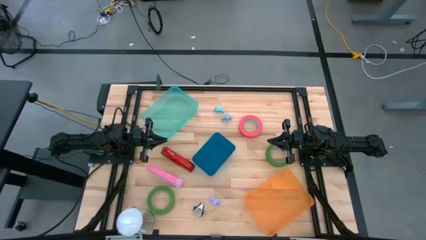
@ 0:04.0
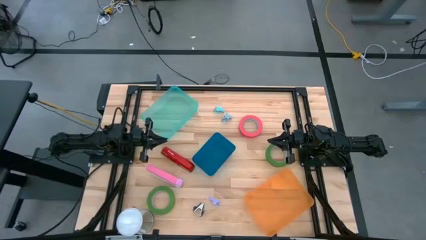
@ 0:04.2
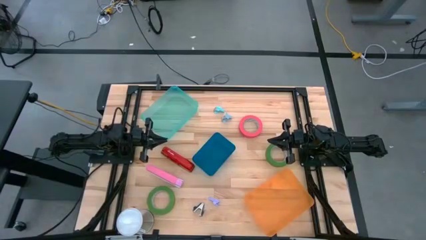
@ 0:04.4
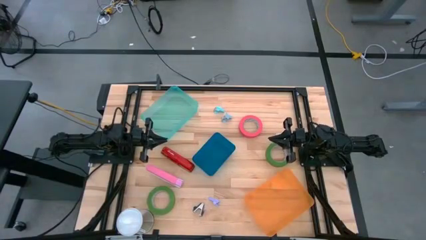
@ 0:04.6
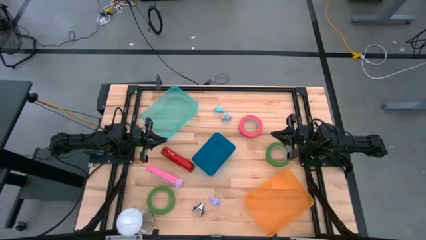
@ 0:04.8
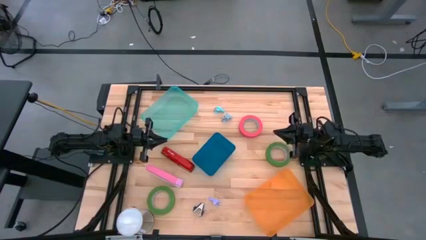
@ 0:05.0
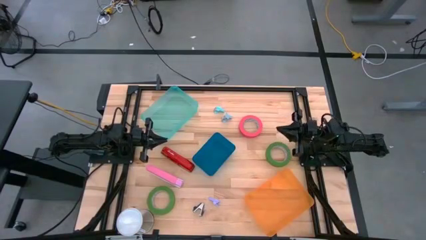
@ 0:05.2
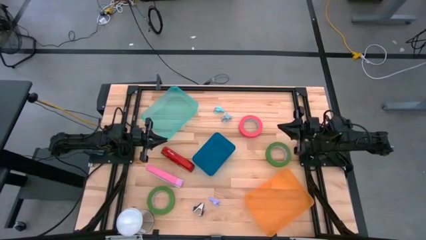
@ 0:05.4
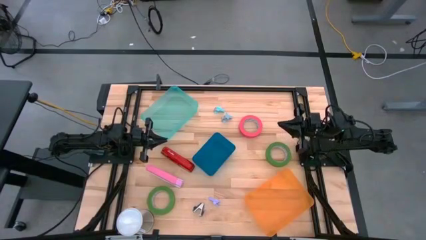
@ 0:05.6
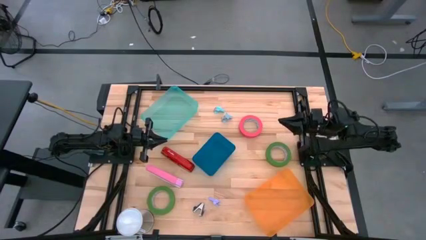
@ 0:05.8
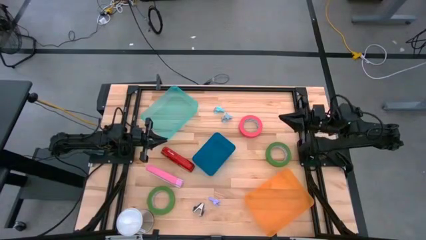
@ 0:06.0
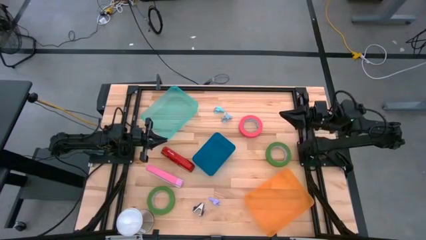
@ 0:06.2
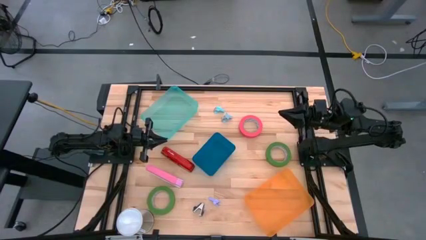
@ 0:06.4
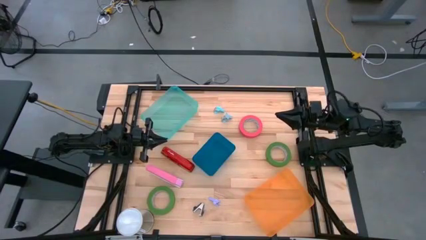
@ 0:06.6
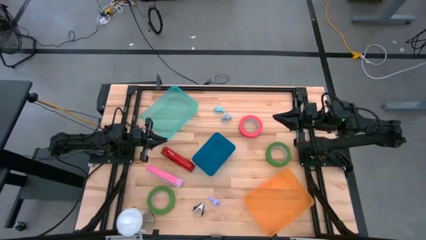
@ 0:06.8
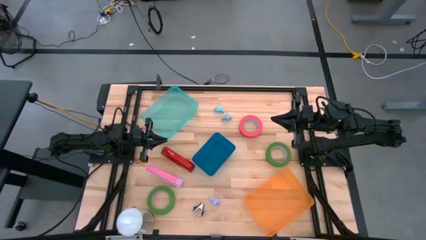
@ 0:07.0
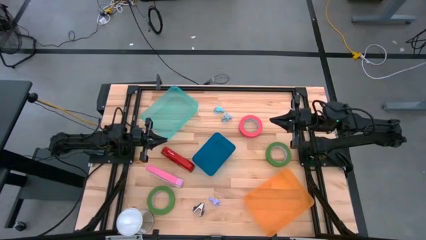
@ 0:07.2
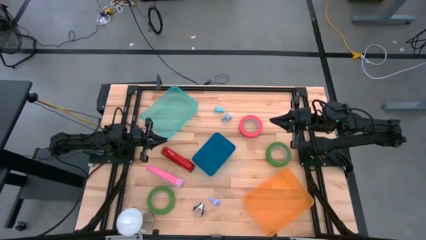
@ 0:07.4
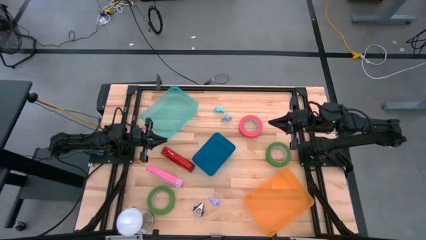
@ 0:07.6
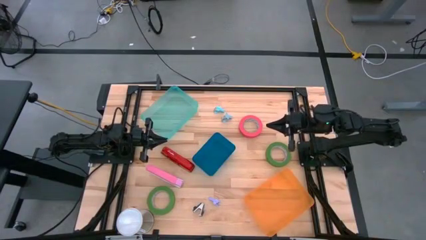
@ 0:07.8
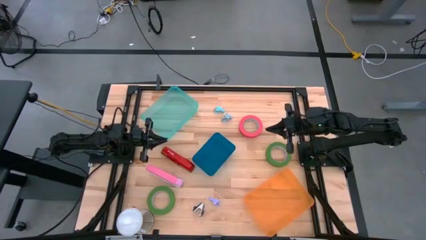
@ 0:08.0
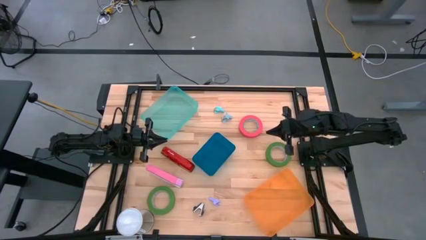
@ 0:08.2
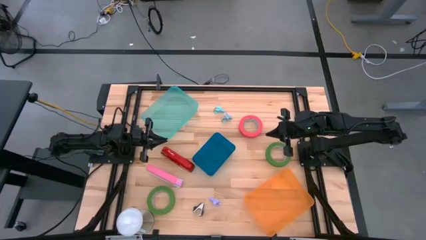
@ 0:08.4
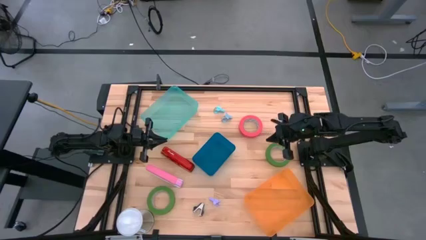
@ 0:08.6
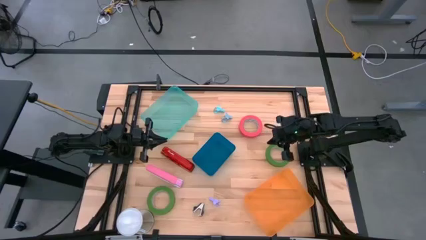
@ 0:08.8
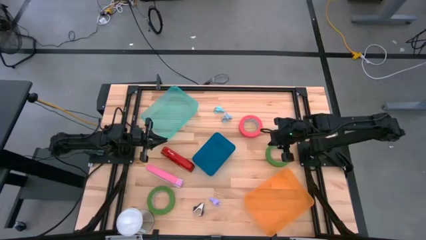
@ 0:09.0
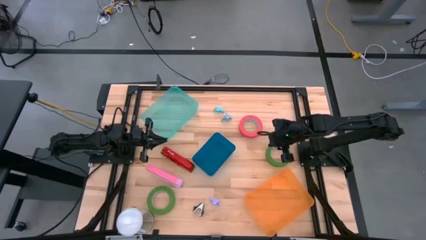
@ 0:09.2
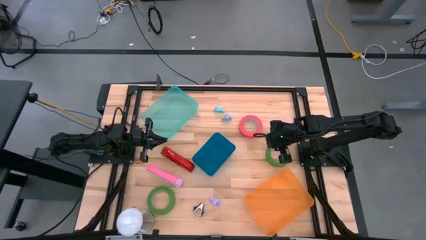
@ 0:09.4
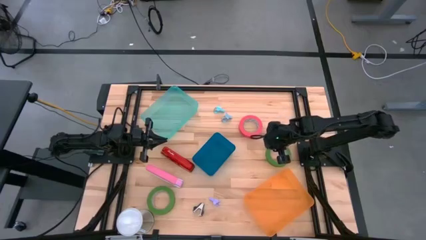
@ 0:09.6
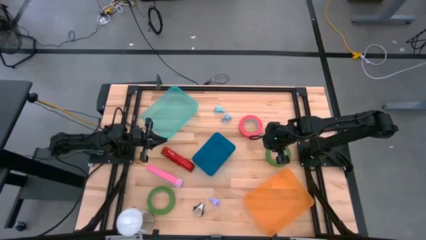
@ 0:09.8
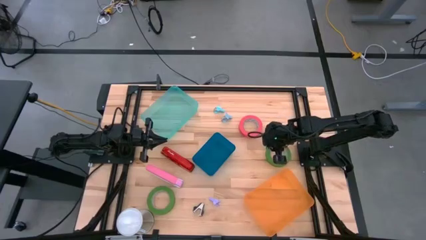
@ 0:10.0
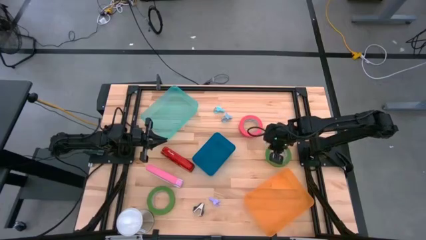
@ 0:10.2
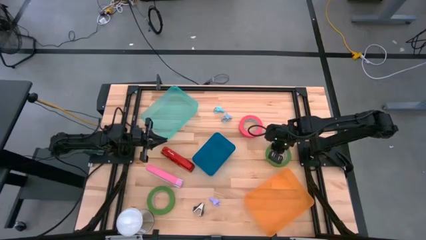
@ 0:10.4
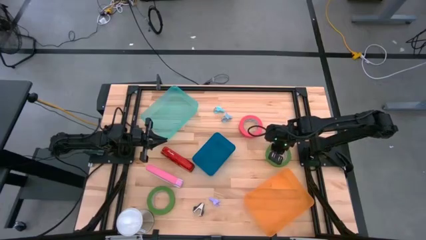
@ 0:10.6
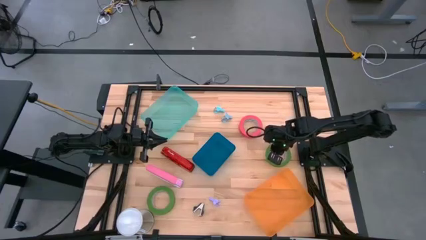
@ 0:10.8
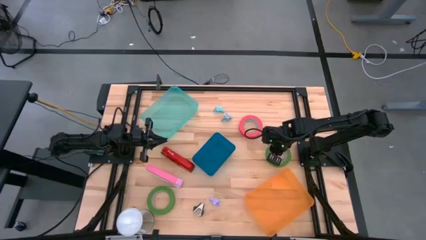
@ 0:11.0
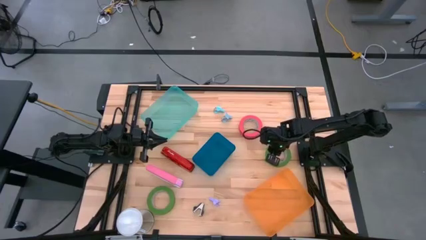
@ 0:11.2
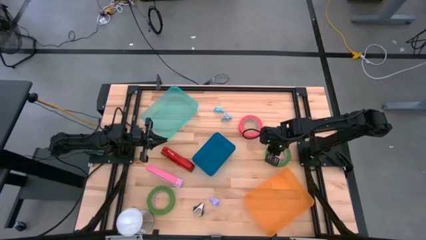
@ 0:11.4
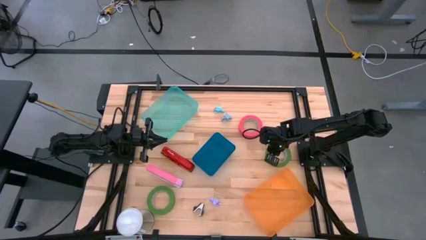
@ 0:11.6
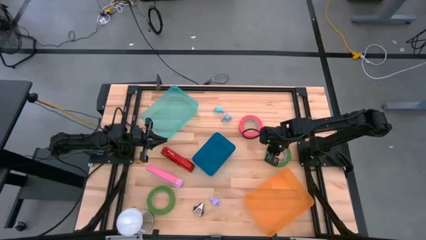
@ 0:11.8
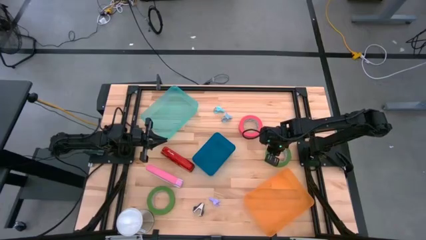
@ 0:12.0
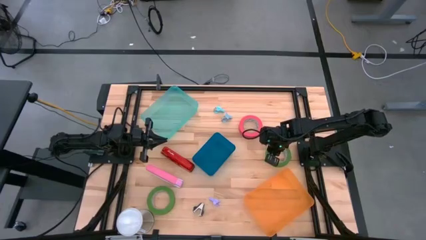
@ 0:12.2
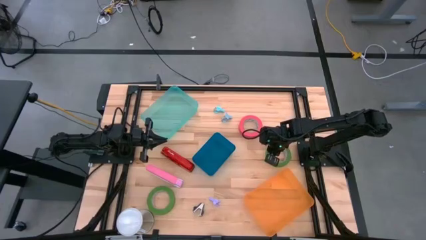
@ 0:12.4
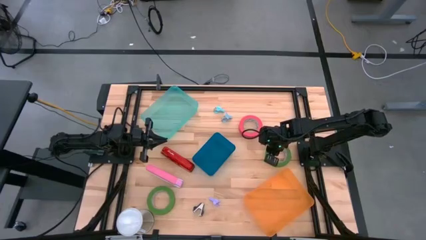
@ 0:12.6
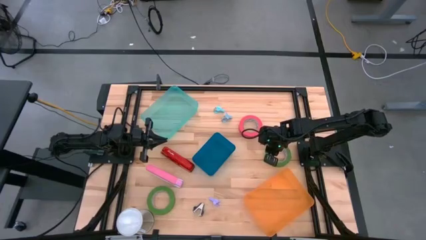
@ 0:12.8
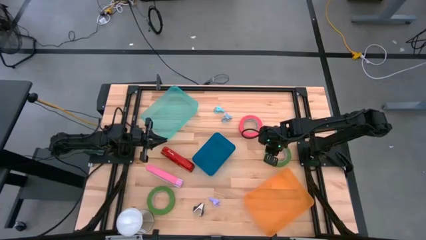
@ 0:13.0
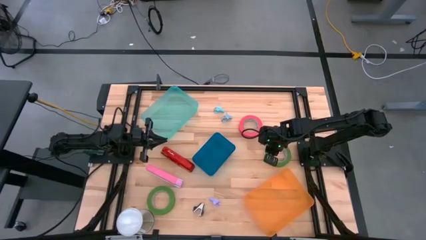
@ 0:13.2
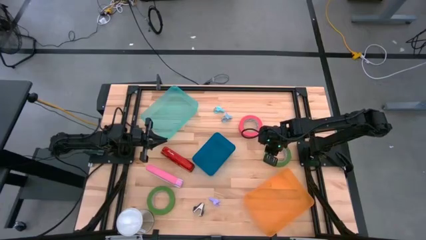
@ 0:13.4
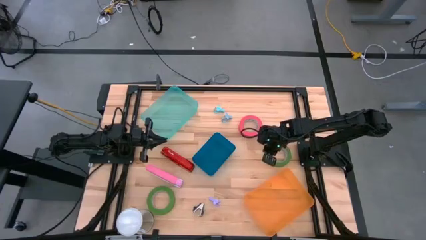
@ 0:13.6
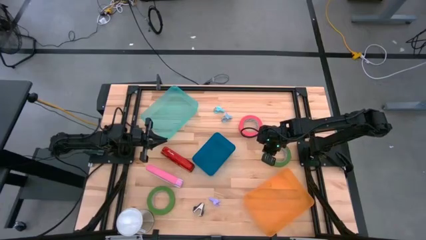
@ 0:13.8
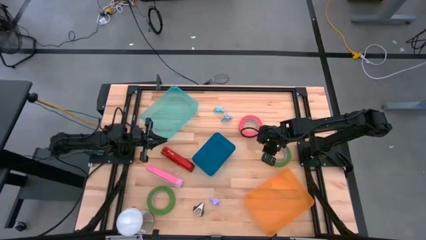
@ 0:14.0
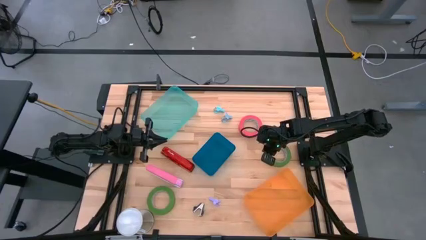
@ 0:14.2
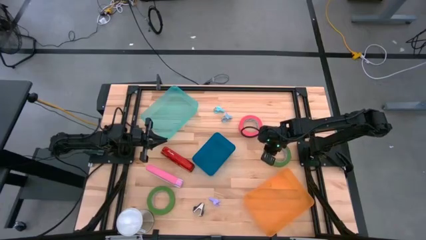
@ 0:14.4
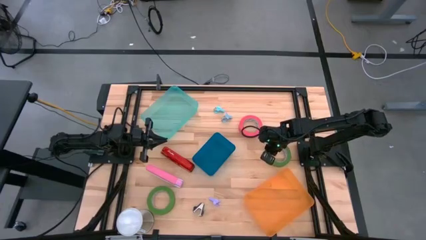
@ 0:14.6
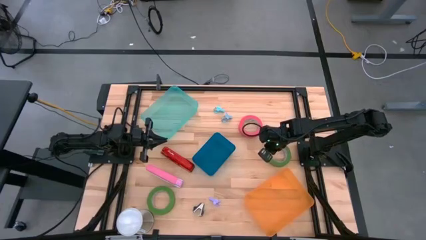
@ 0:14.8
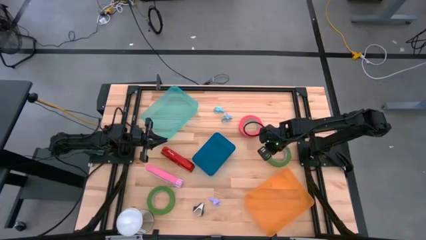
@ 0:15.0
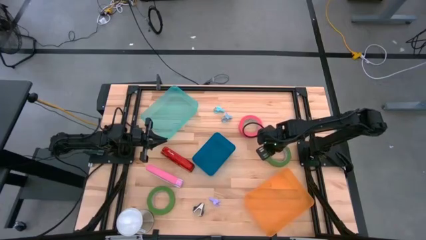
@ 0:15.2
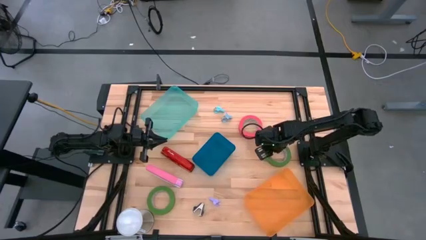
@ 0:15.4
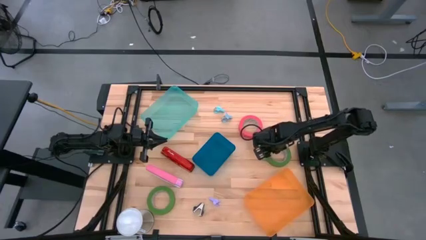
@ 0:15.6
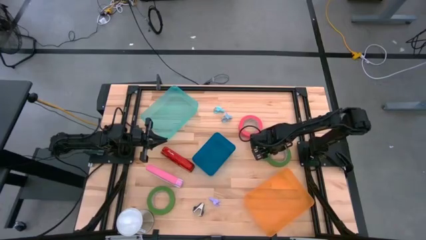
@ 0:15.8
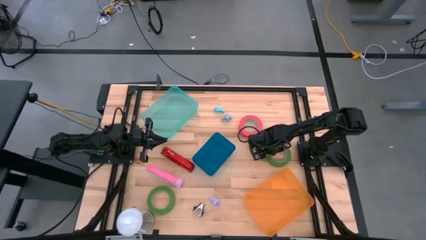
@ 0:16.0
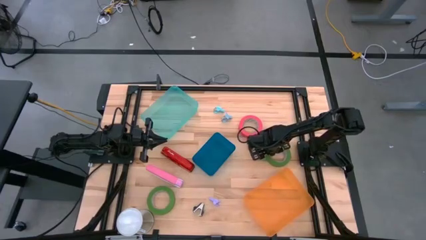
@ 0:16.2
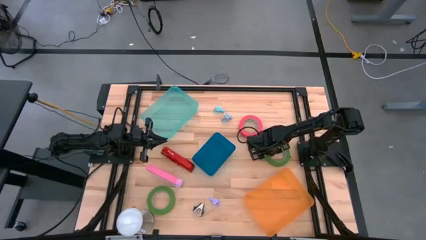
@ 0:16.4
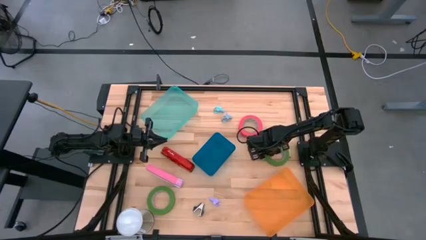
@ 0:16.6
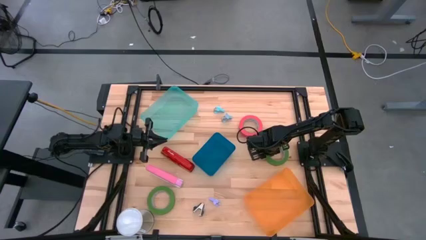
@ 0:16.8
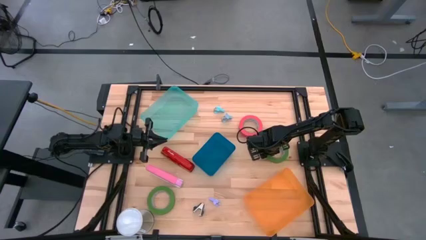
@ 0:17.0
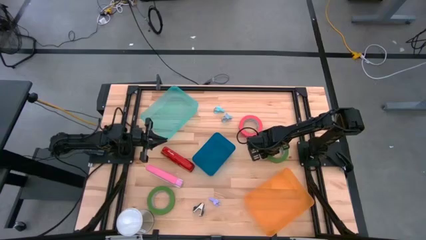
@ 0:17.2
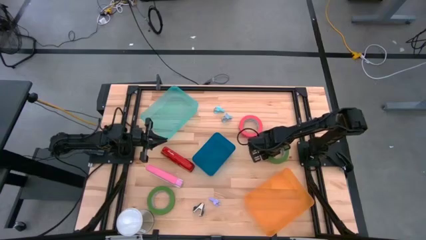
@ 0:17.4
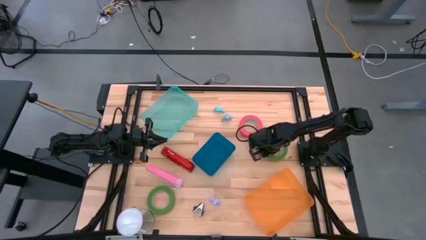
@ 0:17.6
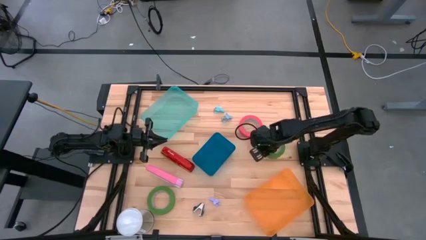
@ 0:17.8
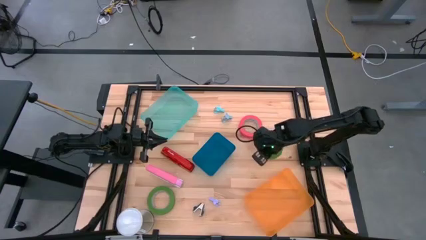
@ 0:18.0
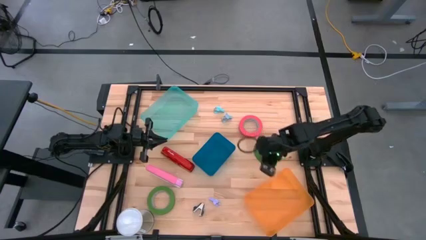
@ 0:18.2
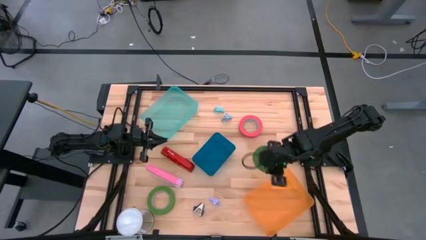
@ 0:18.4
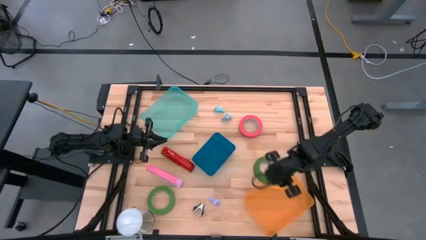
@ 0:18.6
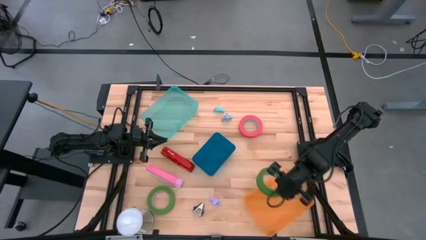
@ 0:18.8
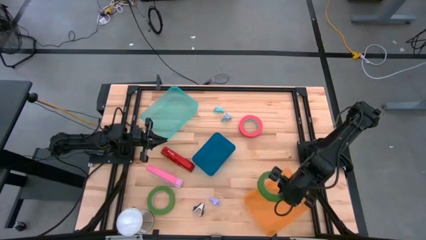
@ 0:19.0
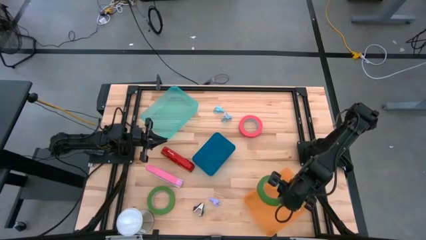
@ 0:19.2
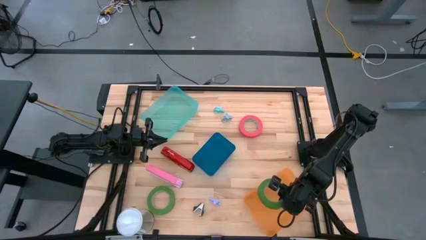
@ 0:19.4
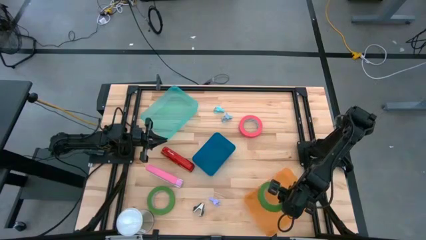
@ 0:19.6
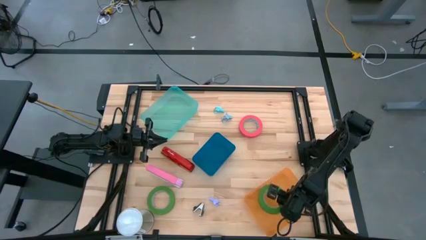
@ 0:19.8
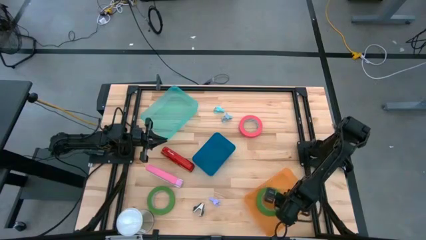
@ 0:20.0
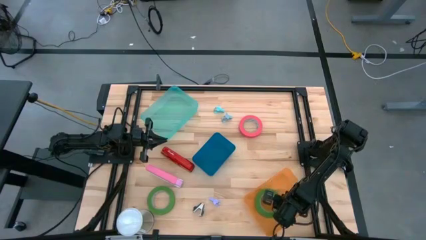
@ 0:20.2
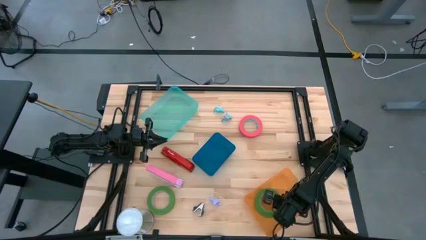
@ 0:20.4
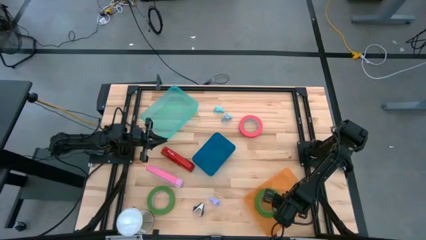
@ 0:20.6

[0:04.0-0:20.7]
Task: Pick and place Stapler, Stapler remover, tape
Put the right green tape into the orange bin
